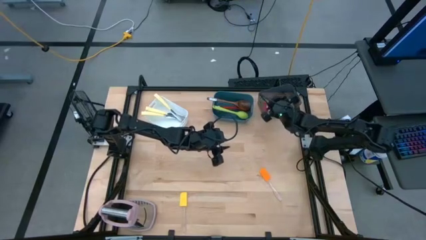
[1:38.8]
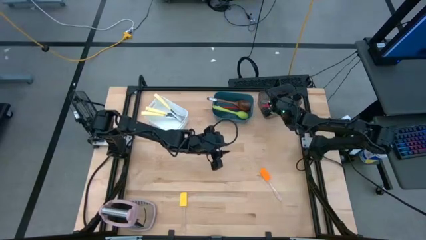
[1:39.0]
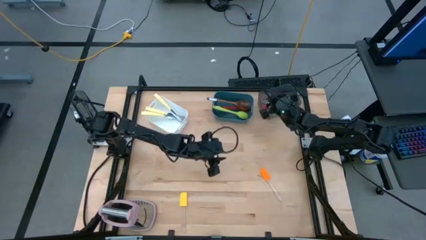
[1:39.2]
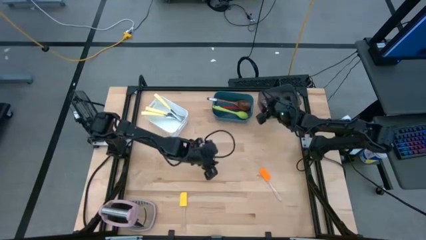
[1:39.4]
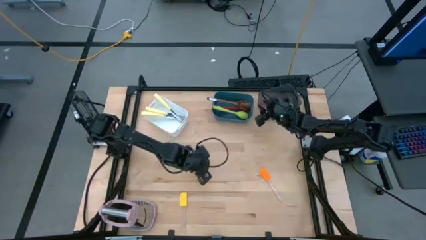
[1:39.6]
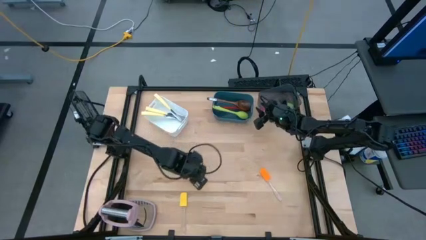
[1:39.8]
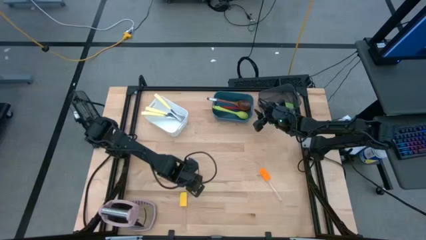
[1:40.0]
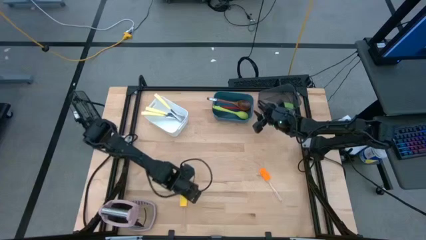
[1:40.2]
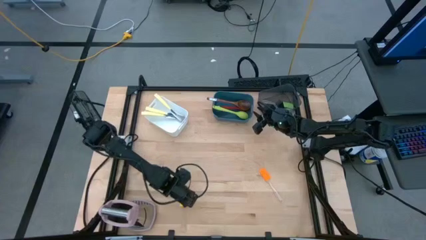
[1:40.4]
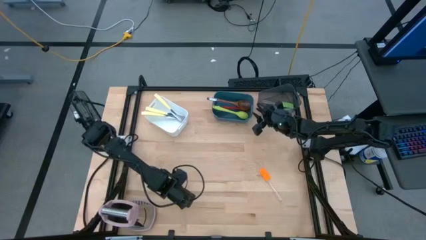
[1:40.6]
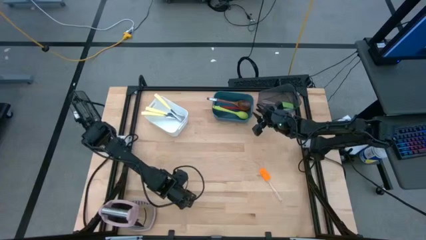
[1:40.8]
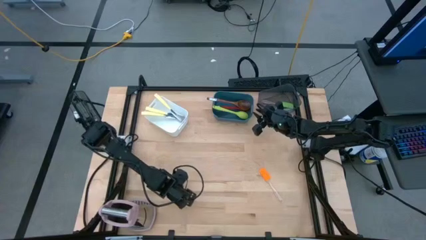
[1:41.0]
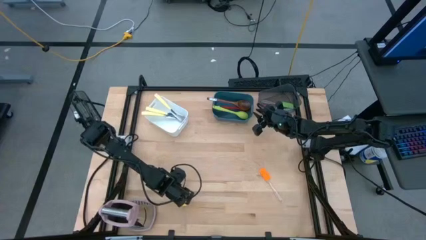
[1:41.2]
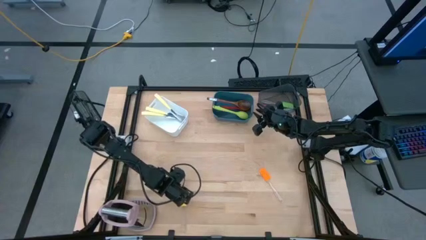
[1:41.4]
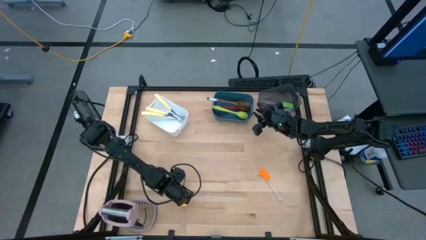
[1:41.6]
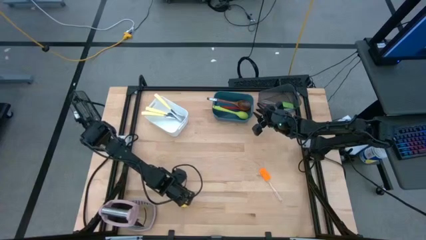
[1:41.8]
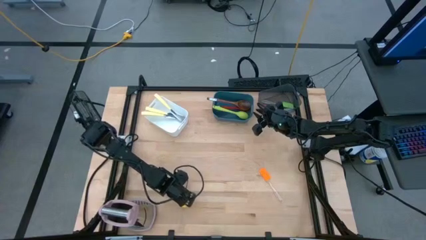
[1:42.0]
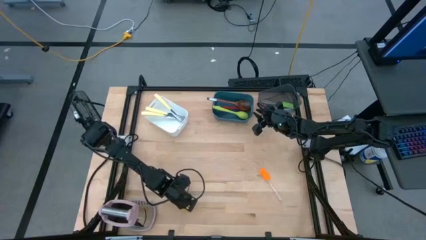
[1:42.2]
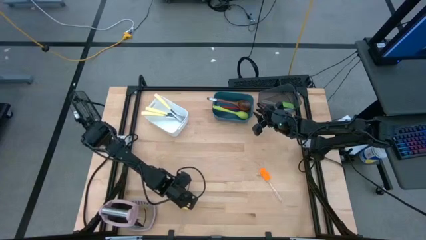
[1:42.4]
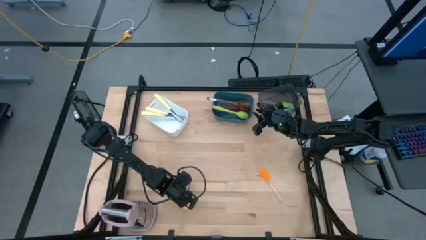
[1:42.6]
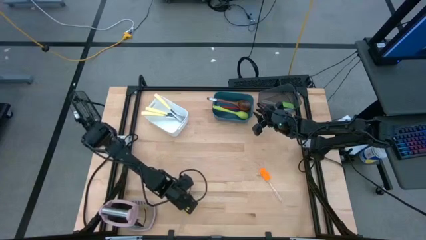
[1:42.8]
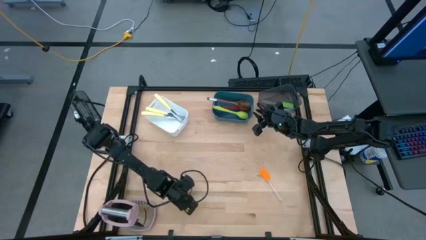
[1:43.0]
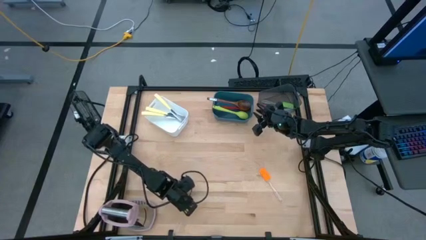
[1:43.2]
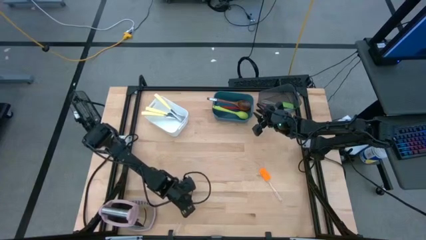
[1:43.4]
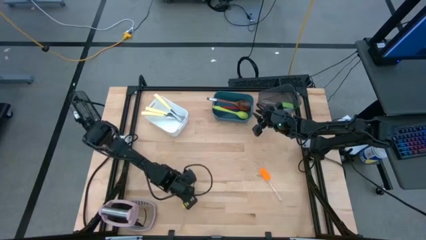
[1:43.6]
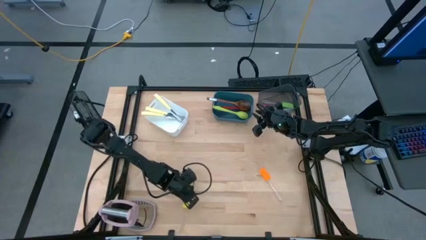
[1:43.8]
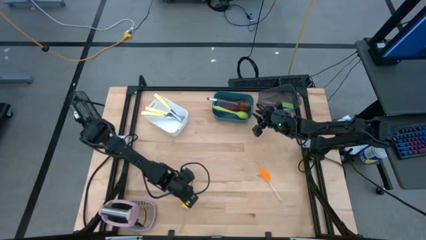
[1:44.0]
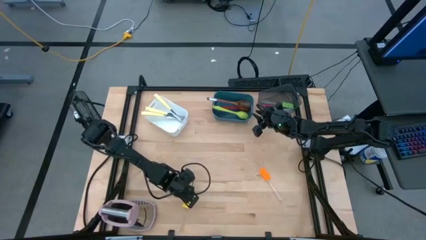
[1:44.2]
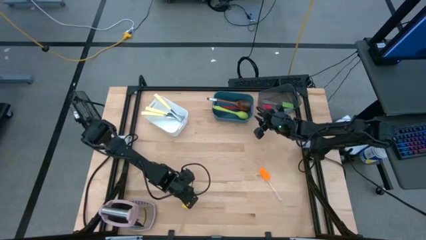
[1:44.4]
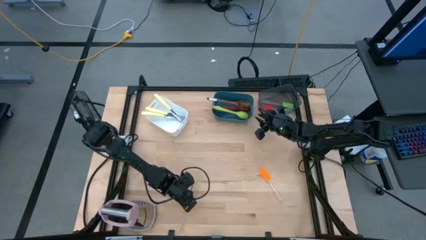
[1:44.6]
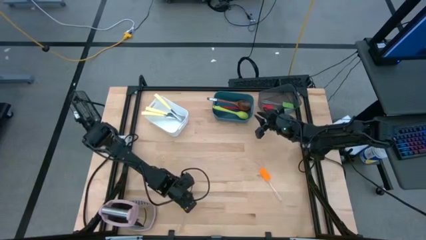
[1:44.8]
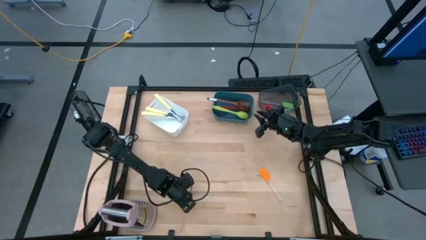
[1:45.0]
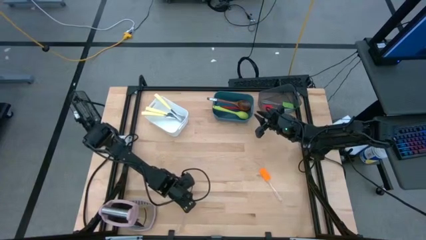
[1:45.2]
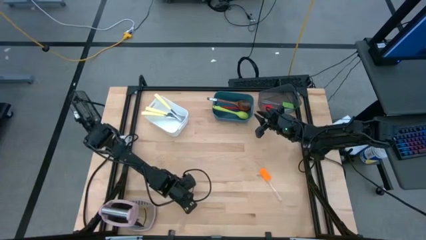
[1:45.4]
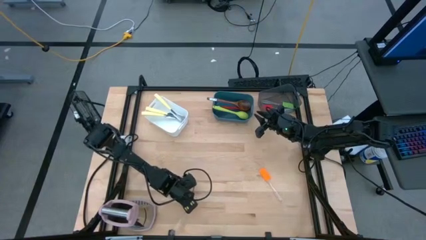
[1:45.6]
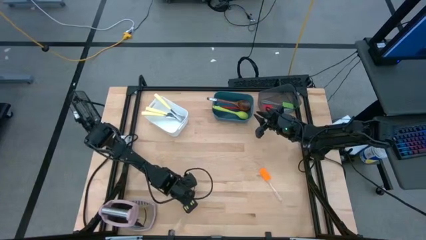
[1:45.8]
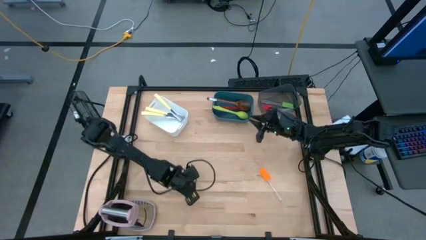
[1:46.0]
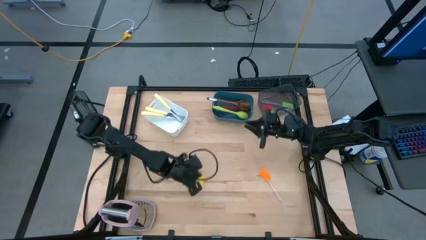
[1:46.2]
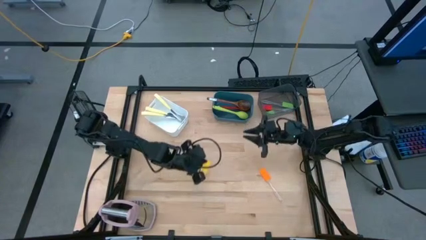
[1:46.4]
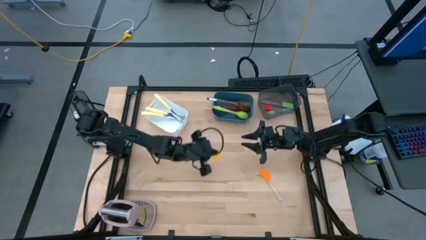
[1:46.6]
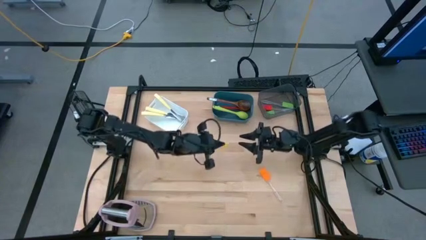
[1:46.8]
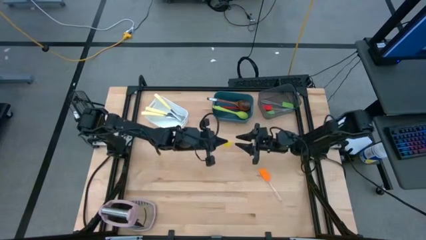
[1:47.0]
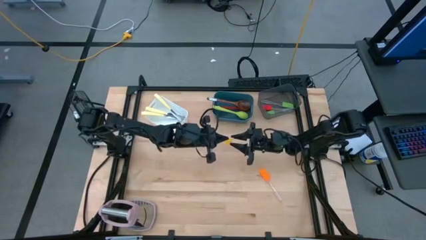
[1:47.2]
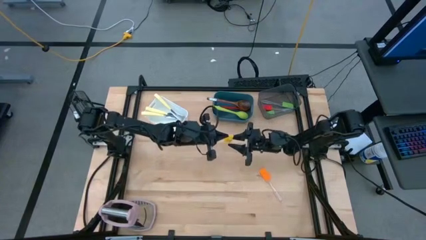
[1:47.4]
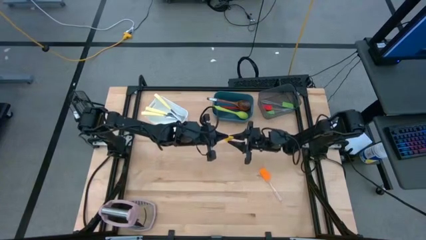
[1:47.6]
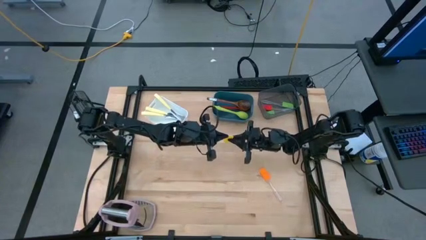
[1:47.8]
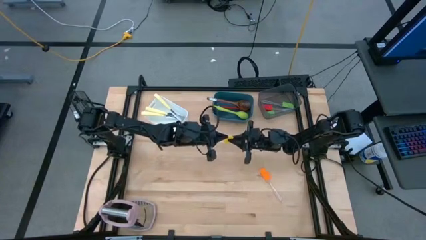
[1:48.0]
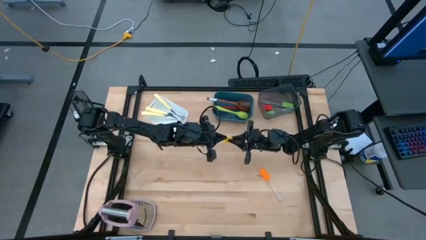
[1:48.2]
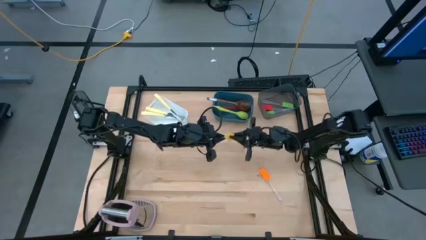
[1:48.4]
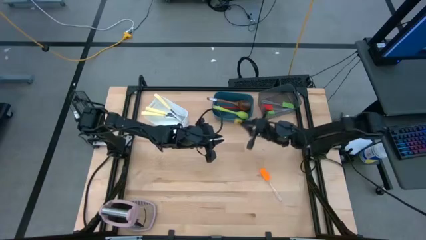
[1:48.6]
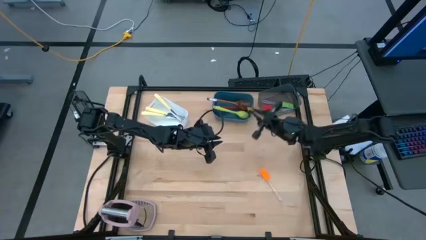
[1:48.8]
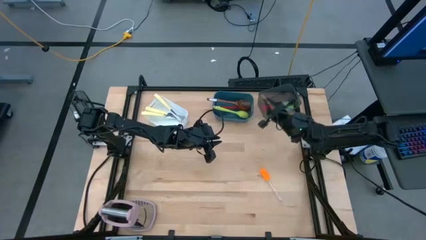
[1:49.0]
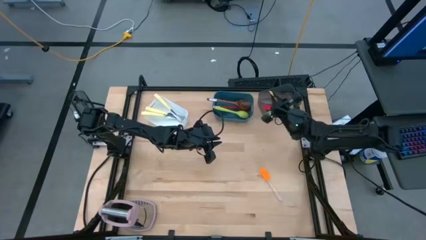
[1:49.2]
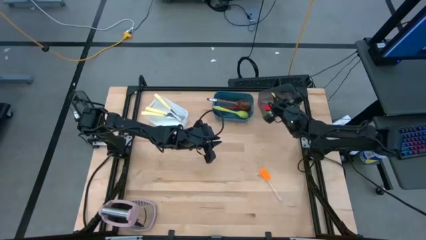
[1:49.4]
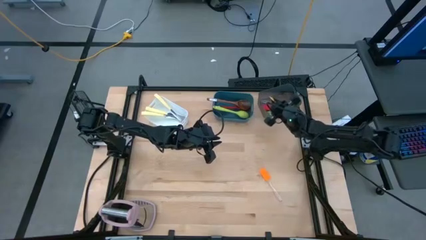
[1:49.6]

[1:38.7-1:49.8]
Task: Pick & Place Kitchen Items
Put the yellow spatula into the black bin

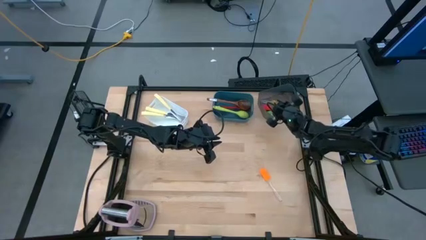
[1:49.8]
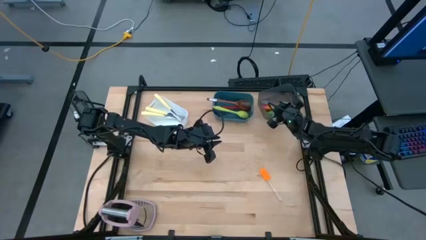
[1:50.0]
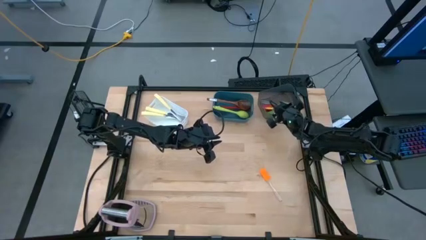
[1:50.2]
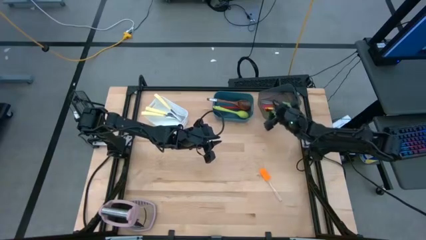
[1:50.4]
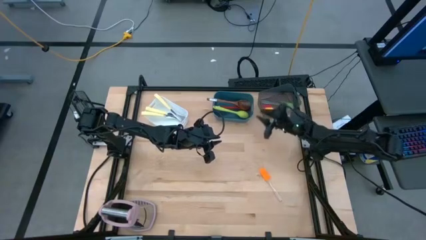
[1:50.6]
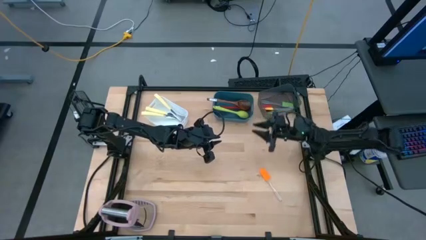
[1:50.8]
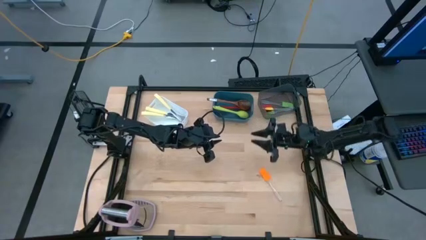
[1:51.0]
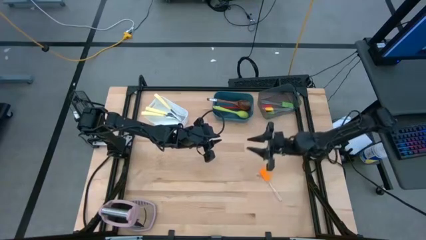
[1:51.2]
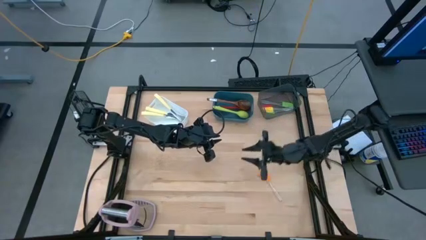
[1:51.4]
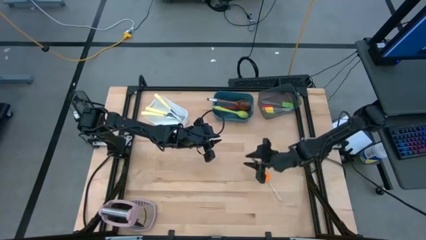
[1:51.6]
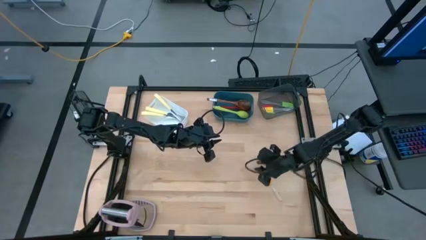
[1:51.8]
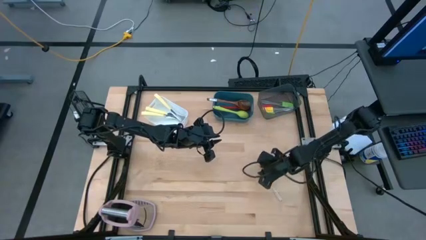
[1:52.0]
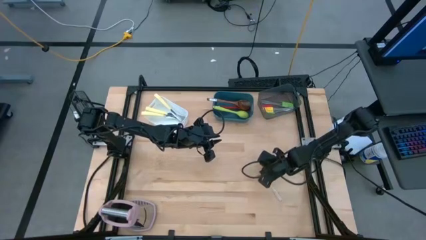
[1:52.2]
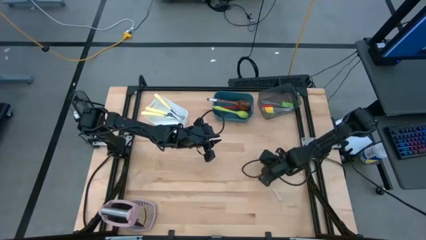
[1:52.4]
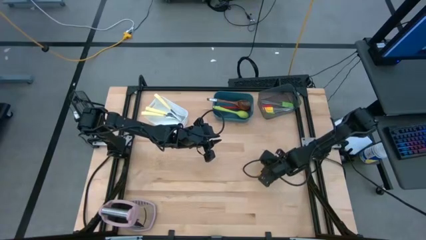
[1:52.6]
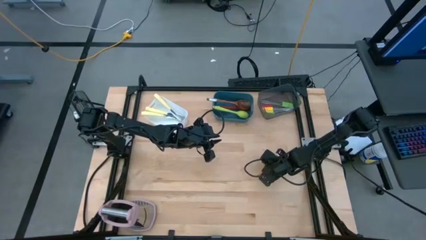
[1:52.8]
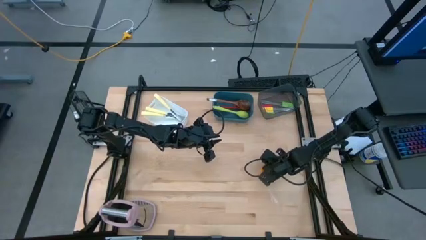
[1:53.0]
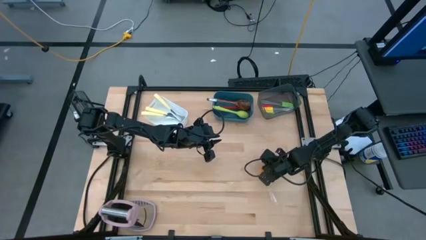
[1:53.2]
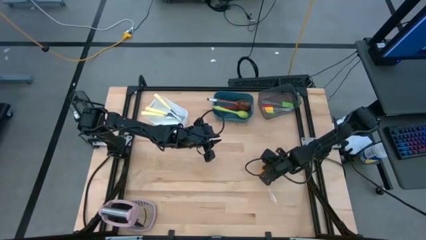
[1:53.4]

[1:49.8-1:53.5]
Put the orange spatula into the black bin

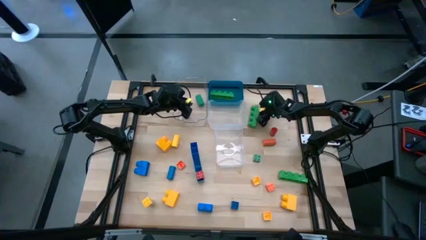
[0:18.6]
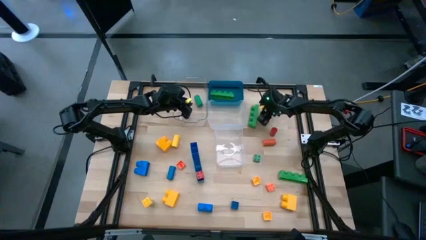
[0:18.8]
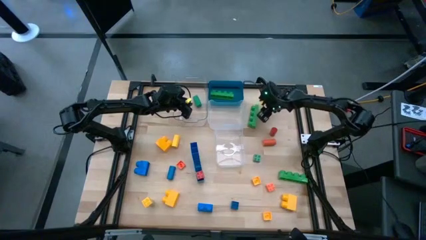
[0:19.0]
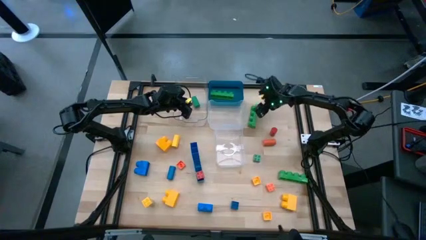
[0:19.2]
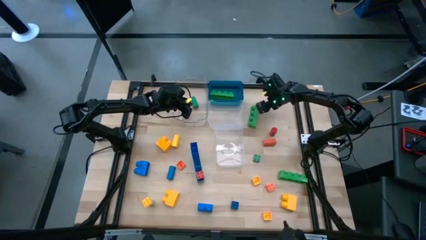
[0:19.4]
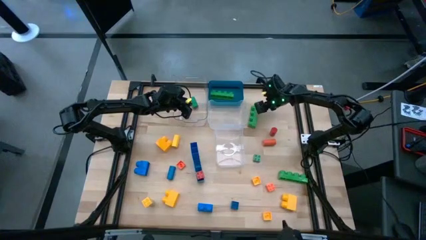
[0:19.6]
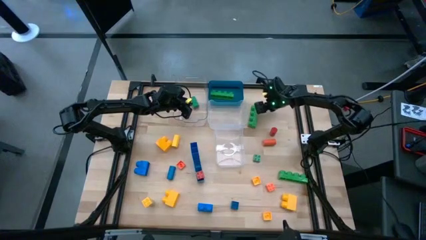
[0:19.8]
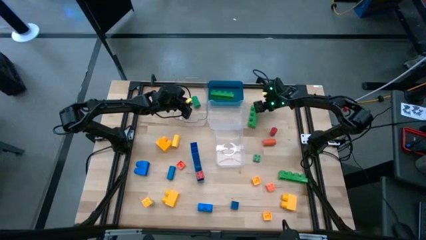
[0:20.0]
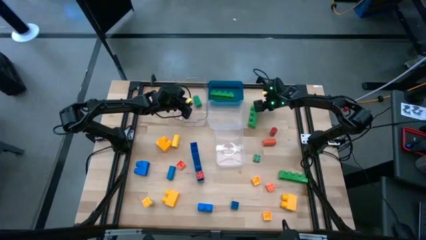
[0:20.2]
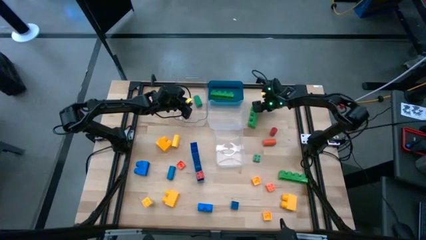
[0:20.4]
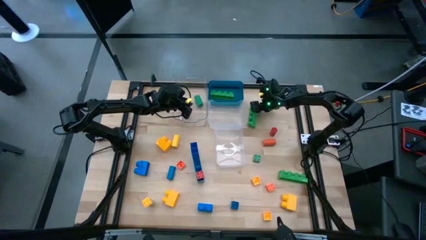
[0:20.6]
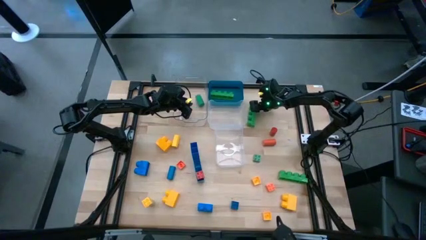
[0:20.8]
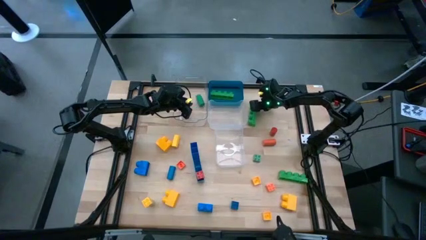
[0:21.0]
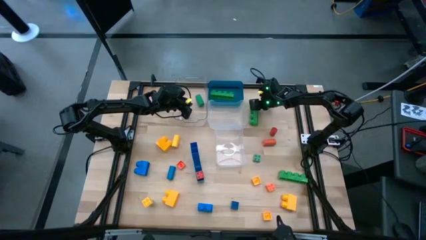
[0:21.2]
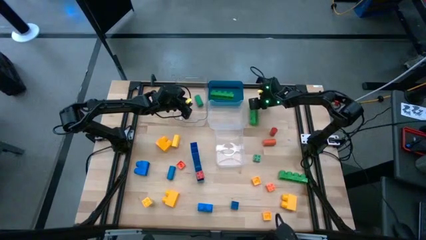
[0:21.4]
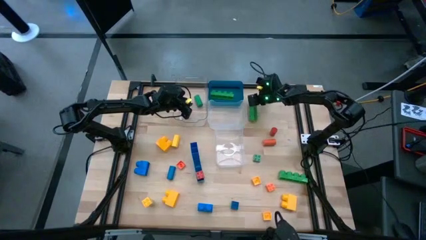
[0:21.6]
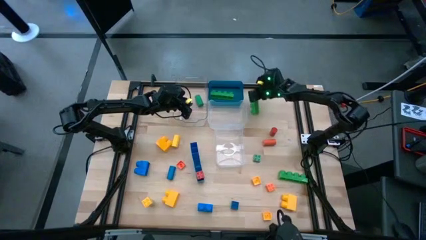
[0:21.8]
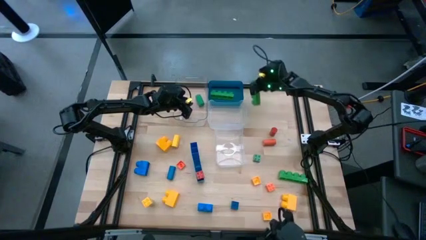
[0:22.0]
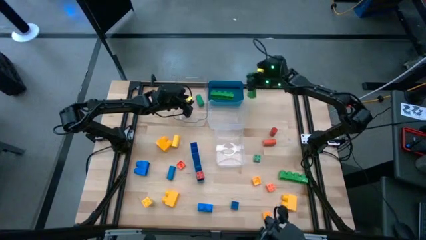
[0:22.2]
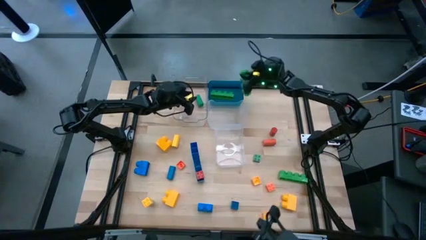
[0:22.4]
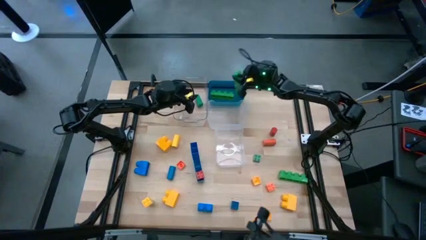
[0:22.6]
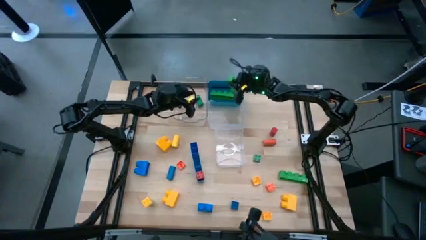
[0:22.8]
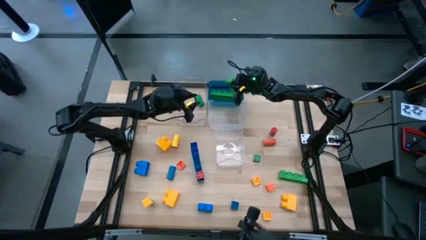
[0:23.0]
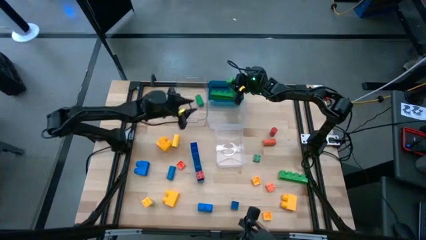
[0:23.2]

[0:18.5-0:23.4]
Task: Sort blocks by size
Put the green 4 stud large game piece into the blue bin
